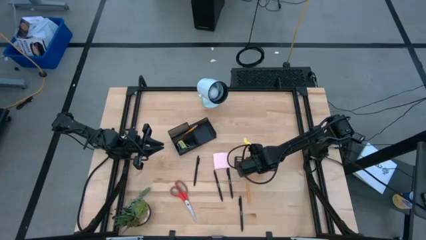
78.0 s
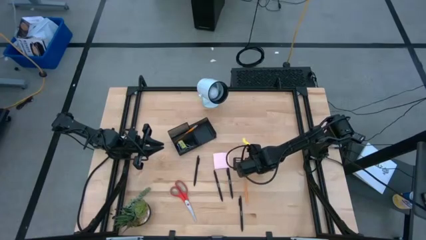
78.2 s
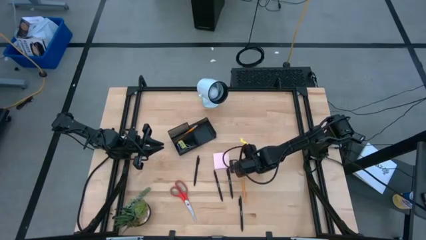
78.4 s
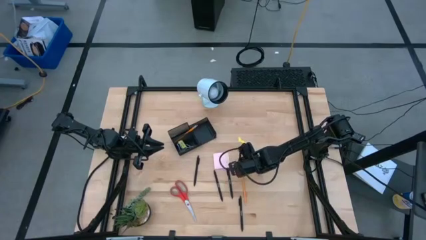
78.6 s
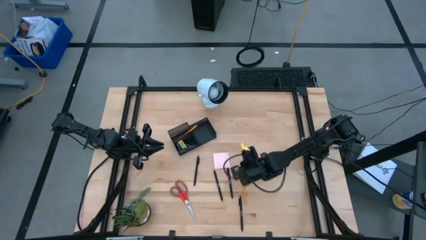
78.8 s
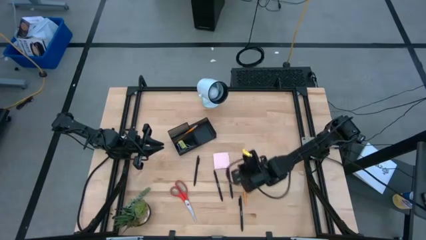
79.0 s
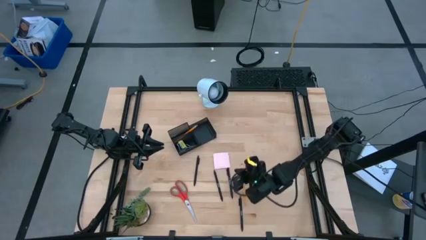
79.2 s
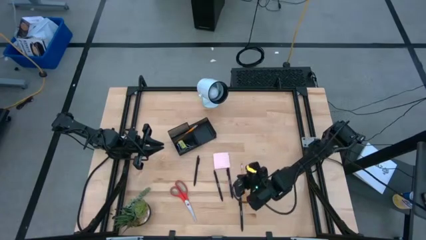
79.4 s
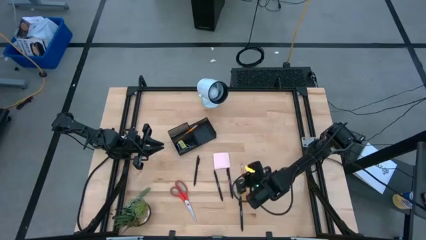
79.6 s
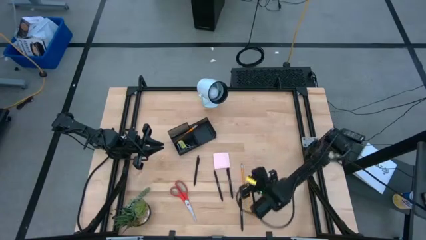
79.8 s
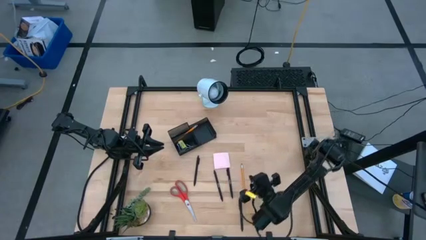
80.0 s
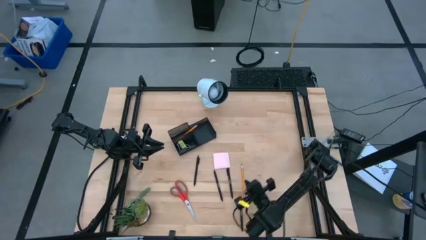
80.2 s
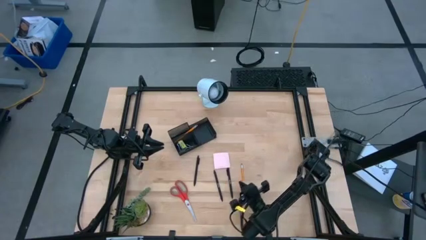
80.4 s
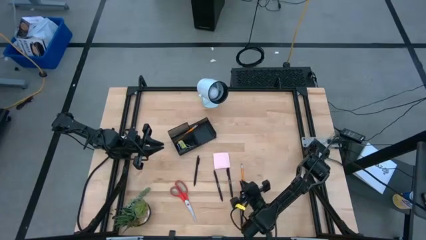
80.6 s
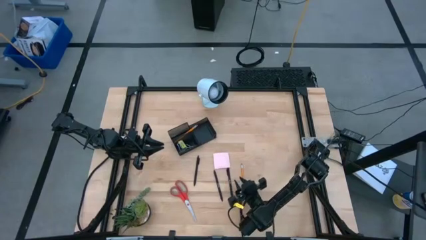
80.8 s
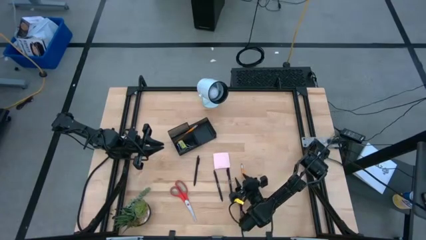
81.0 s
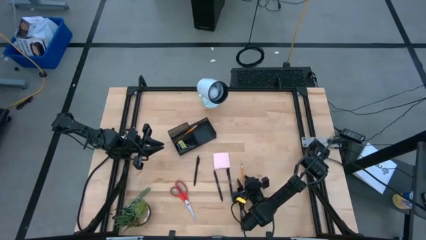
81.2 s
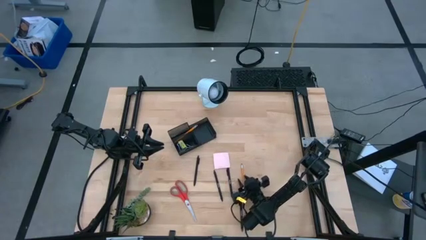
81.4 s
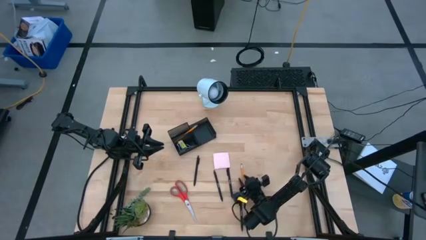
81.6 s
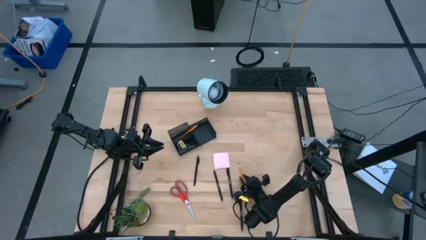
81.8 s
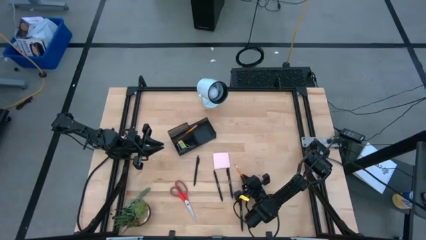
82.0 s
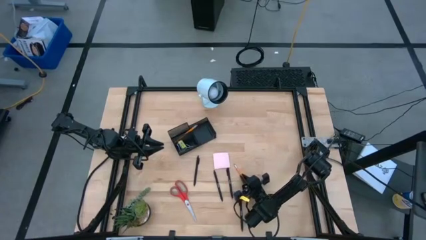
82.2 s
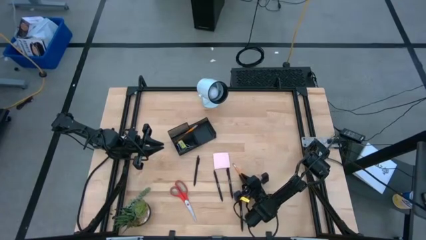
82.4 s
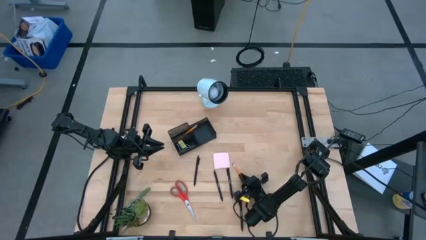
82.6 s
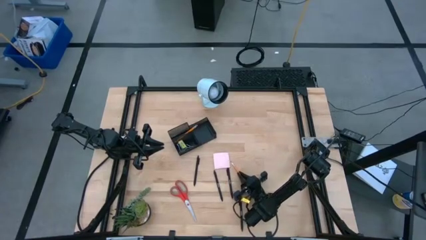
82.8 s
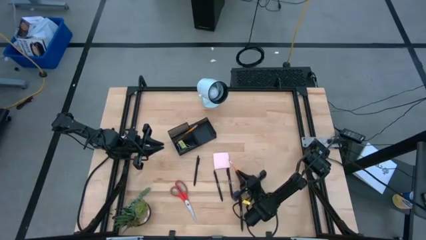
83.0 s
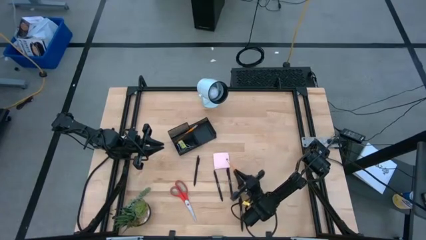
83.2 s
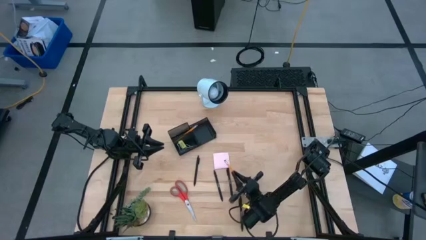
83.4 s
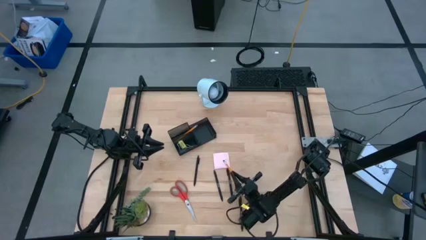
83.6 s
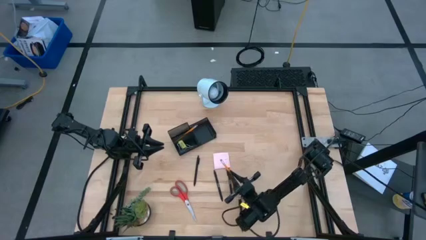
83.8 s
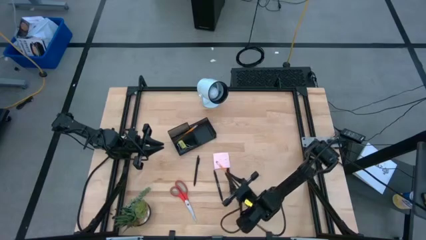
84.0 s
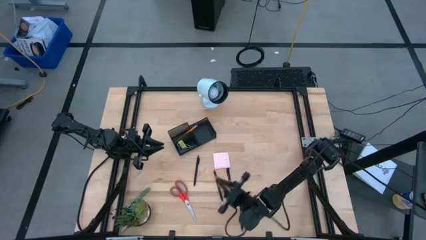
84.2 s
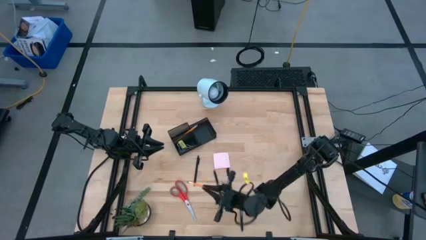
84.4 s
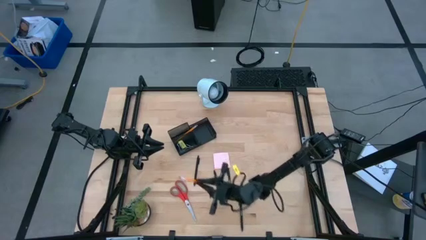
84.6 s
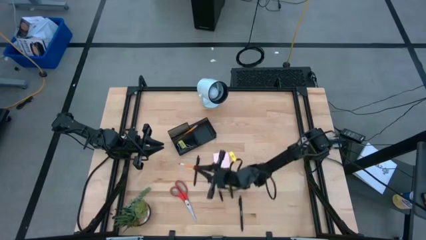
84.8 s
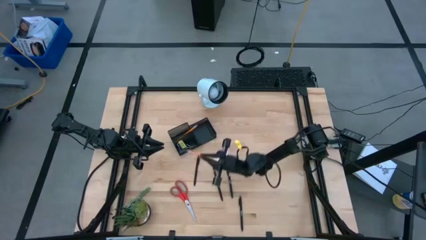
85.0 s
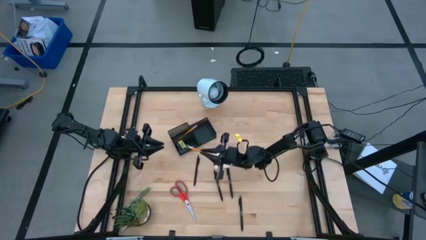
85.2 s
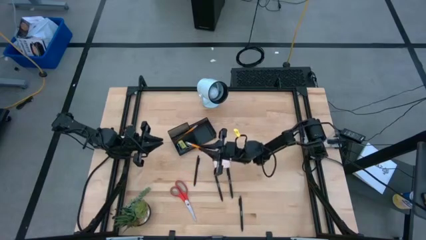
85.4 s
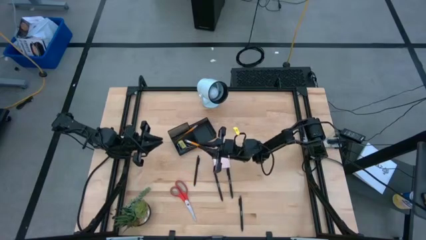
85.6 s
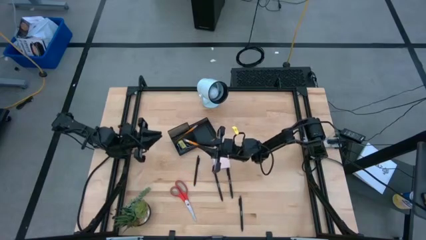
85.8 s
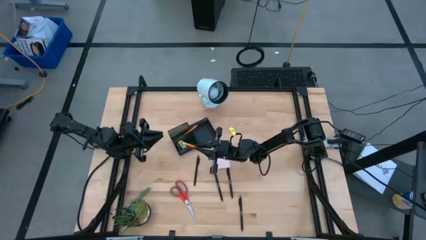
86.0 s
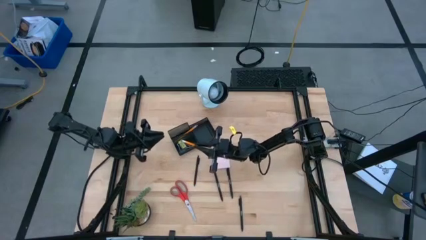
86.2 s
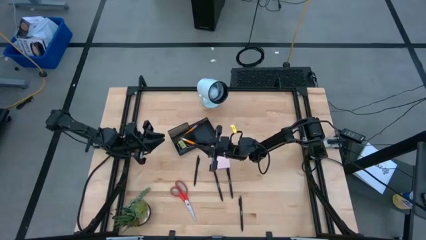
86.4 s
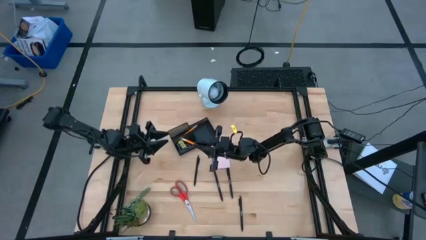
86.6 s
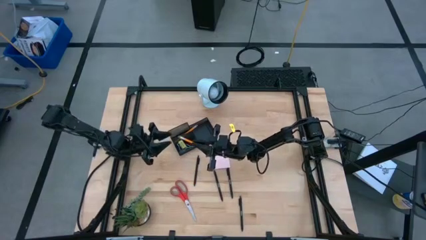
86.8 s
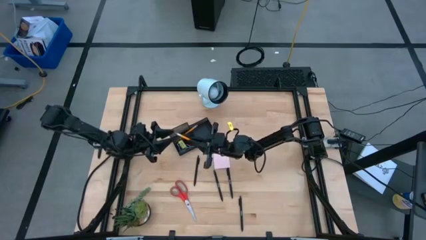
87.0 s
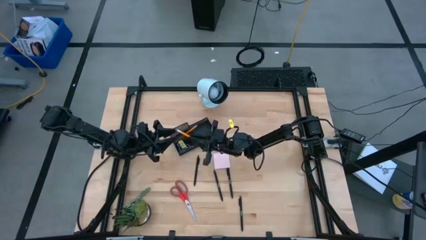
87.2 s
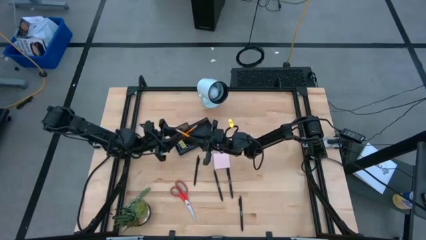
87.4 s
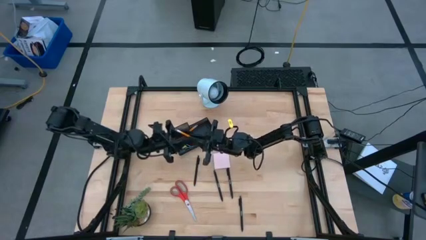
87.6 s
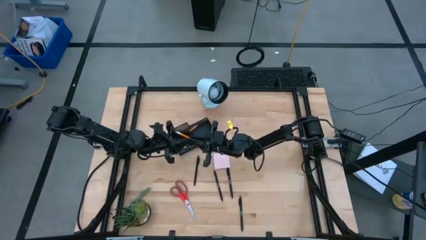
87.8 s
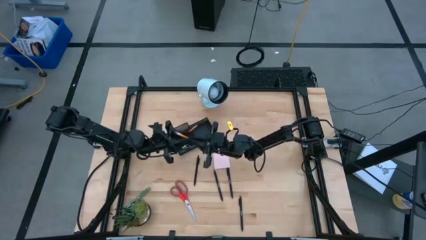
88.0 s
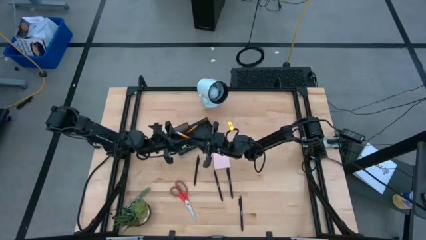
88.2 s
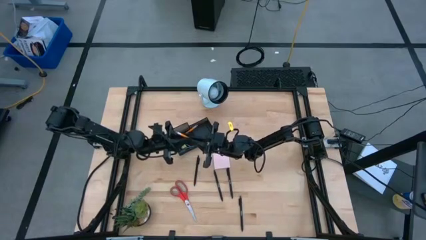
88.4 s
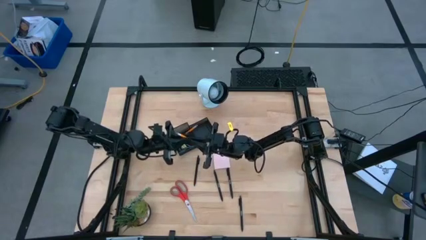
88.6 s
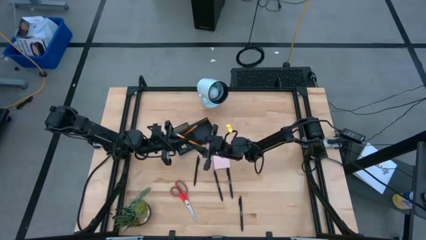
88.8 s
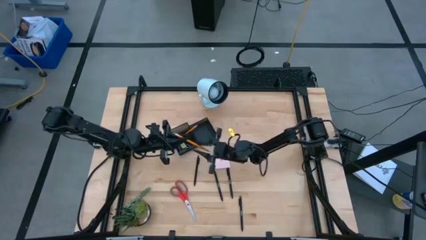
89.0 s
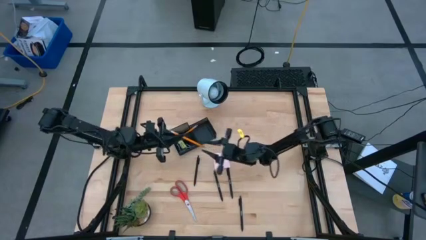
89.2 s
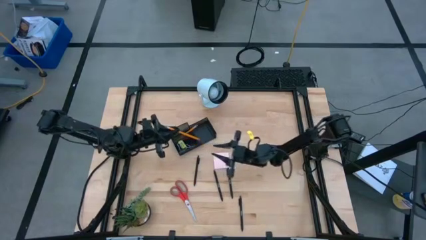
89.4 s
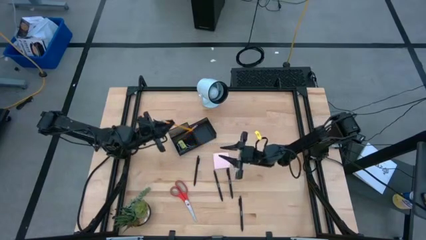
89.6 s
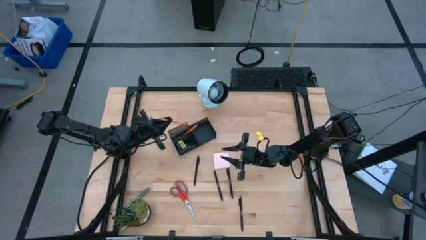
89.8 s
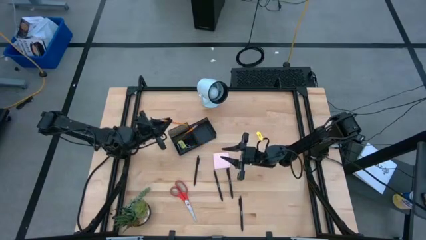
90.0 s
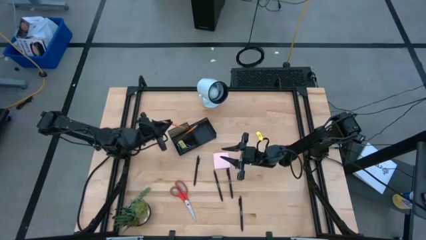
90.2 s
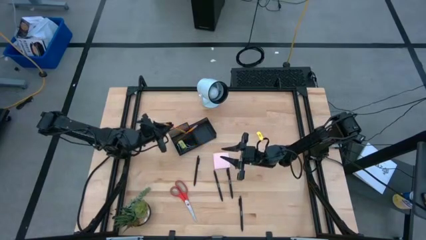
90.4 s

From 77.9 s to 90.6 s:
Task: Pick and place office supplies into organizer
Put the orange pencil into the black desk organizer

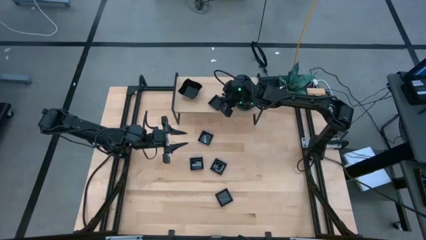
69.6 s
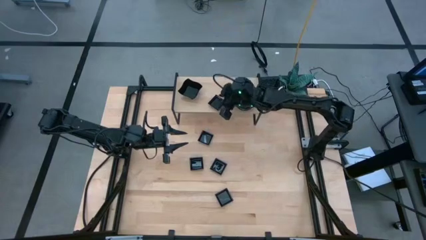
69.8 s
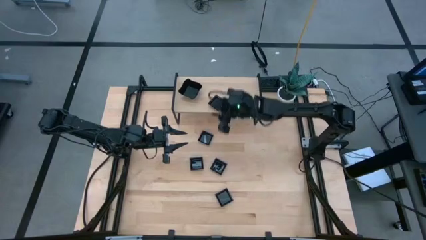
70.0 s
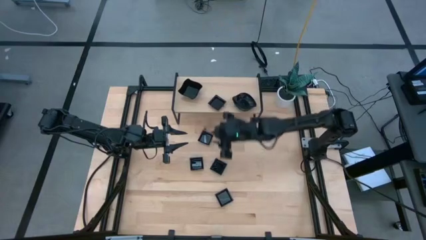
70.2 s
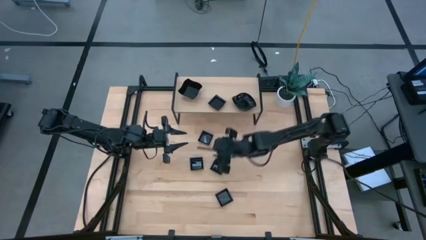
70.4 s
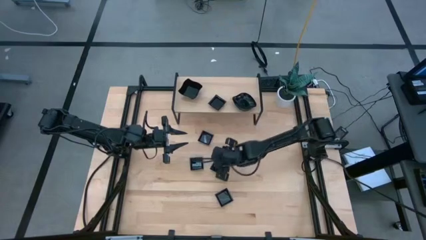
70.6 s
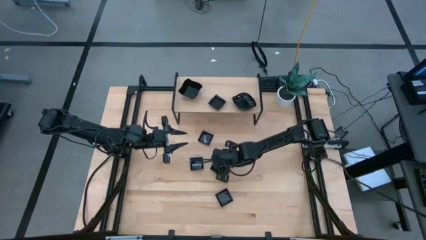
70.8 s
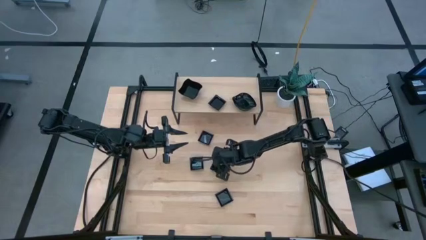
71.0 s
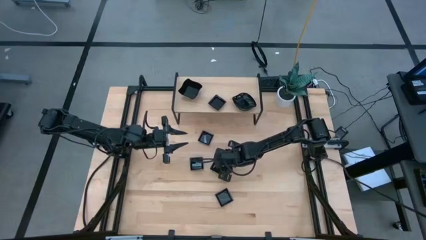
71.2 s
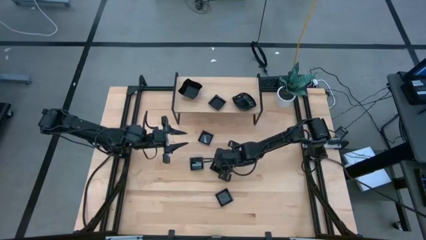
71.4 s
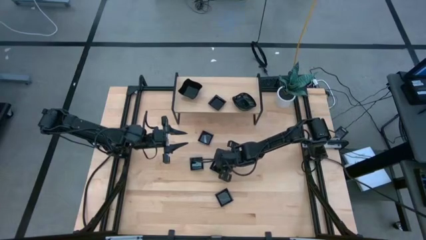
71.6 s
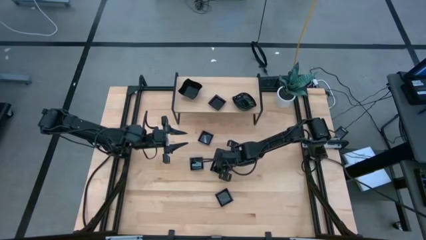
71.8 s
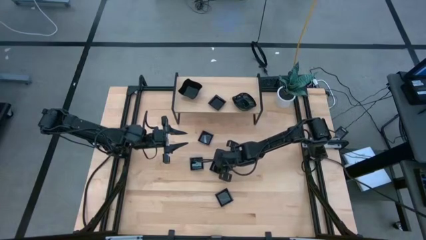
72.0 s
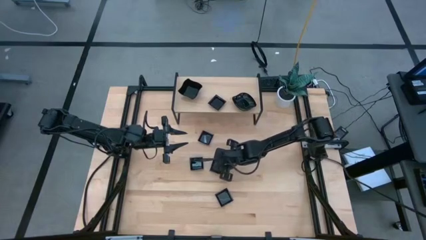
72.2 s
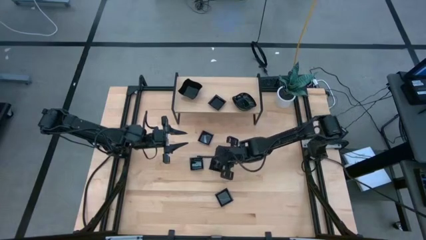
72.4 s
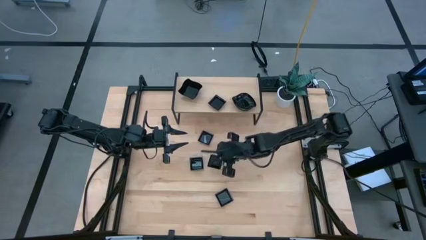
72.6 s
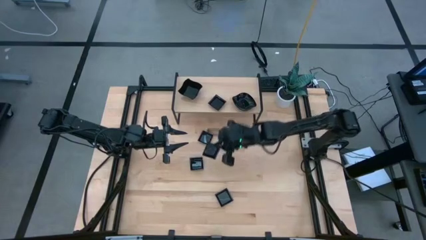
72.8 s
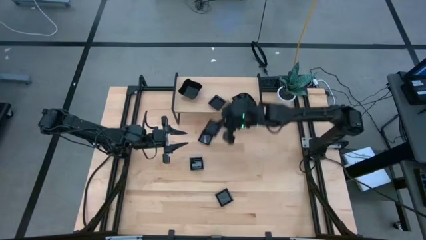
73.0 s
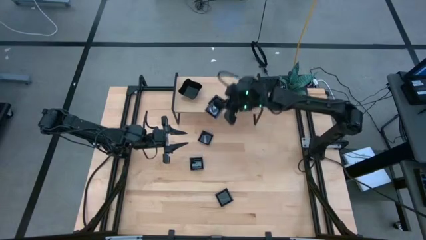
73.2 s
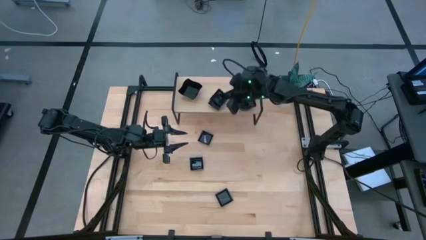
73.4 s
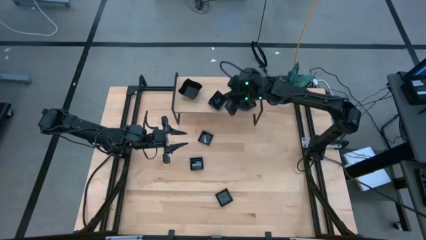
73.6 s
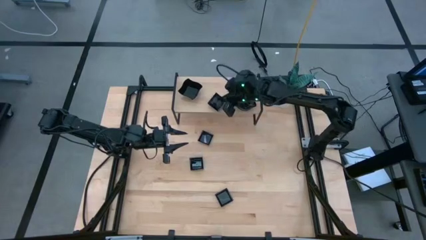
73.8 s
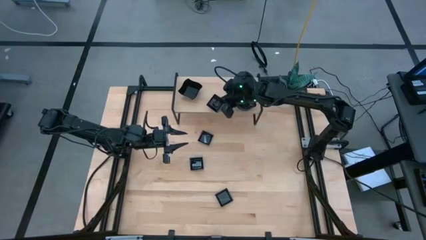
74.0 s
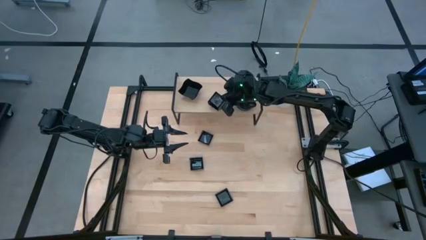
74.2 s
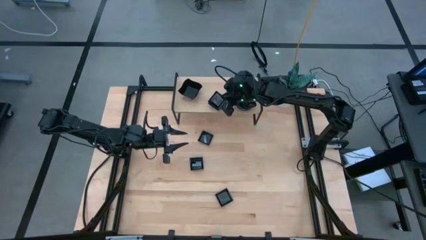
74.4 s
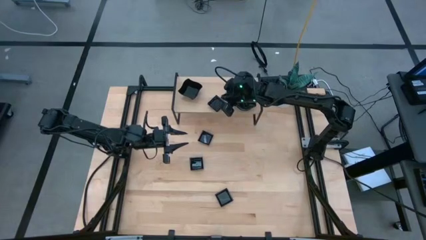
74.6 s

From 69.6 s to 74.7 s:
Task: Pick & Place Mini shaped plates
Stack the square plate on top of the other square plate on the shelf
